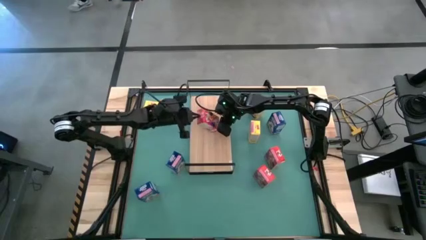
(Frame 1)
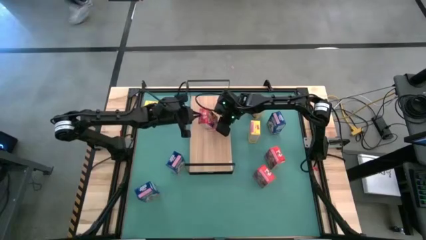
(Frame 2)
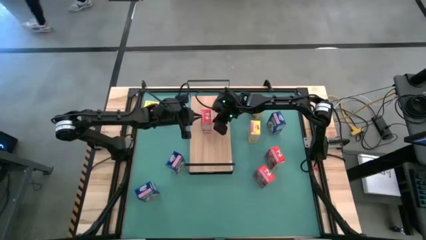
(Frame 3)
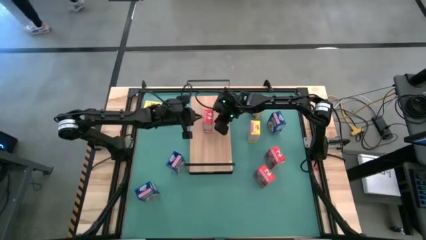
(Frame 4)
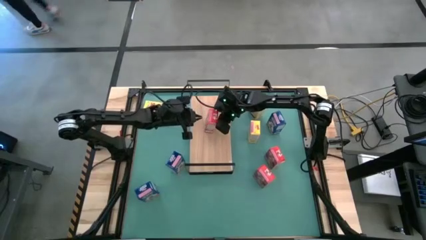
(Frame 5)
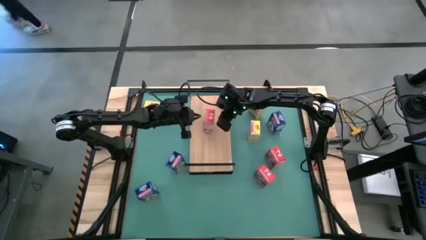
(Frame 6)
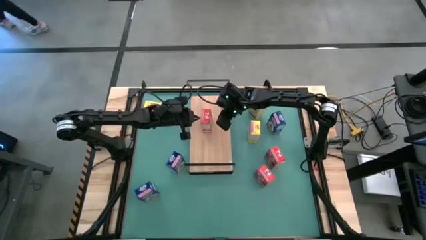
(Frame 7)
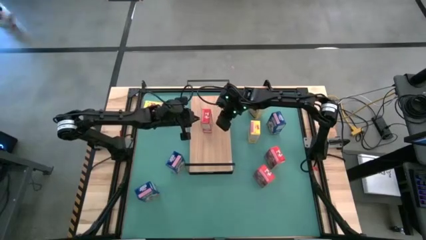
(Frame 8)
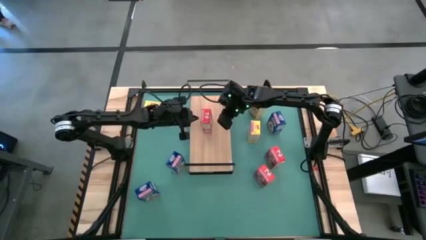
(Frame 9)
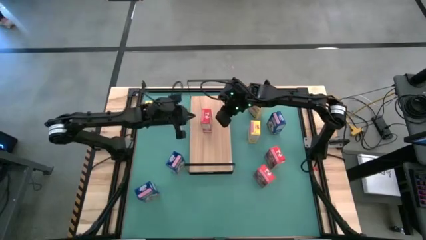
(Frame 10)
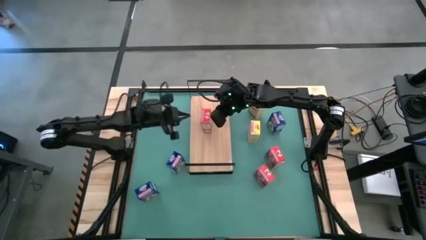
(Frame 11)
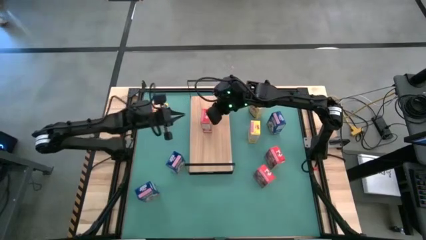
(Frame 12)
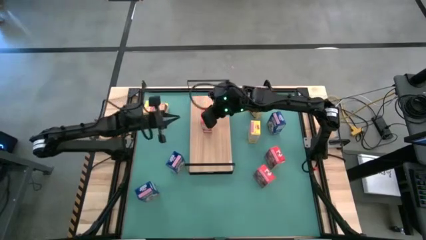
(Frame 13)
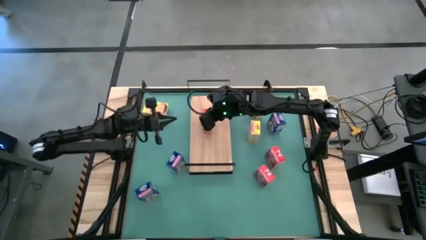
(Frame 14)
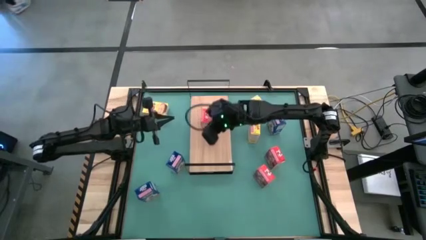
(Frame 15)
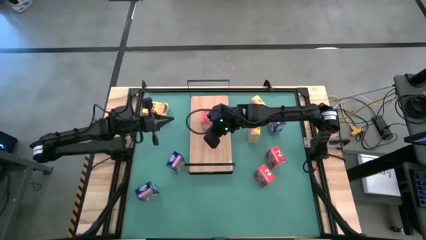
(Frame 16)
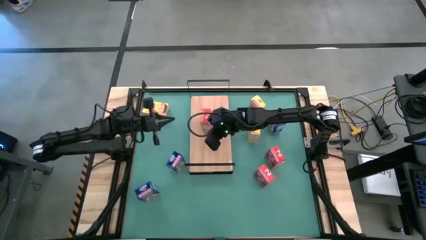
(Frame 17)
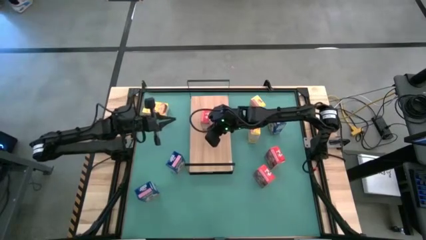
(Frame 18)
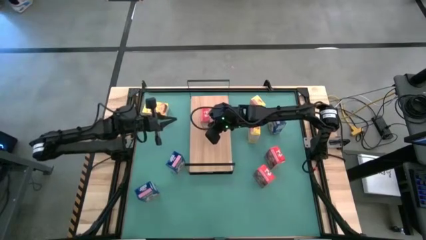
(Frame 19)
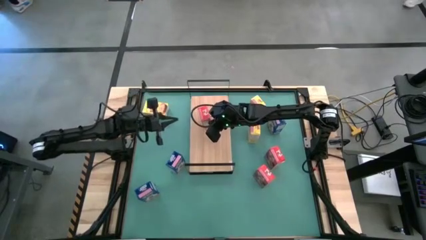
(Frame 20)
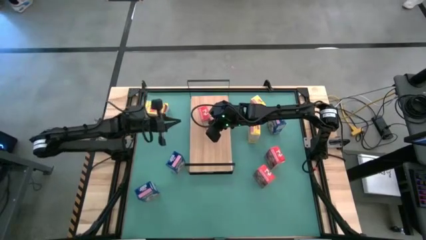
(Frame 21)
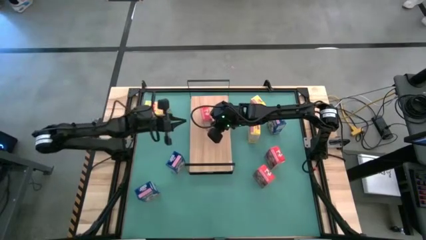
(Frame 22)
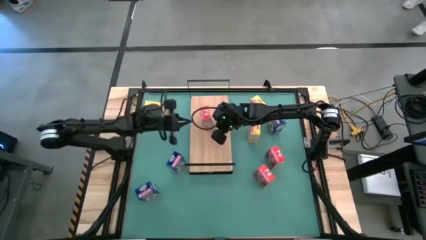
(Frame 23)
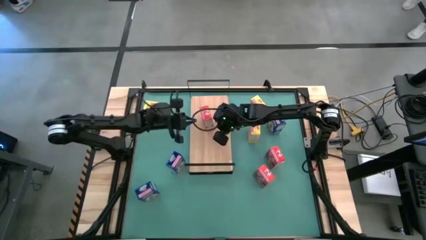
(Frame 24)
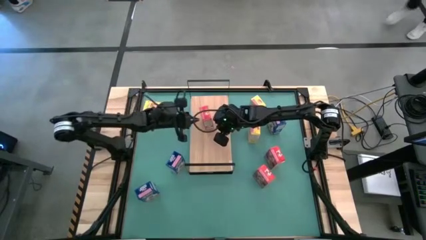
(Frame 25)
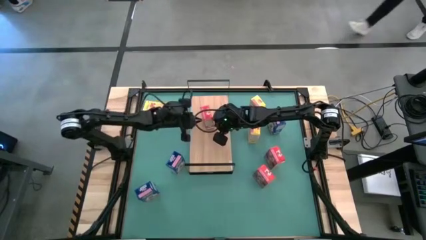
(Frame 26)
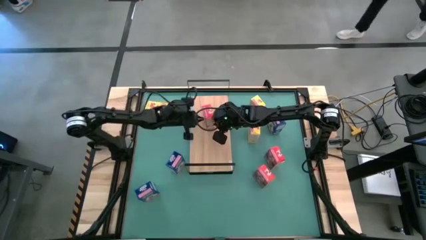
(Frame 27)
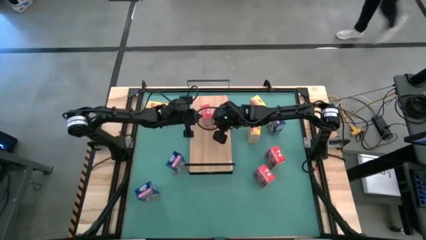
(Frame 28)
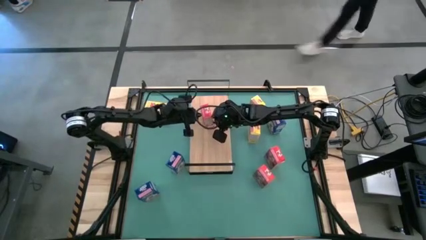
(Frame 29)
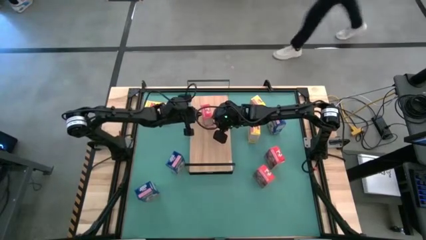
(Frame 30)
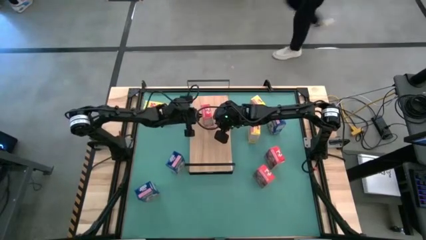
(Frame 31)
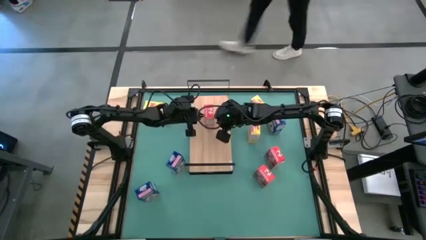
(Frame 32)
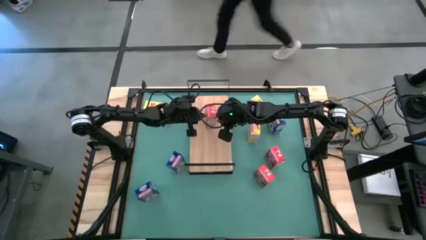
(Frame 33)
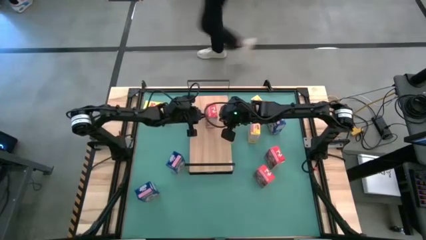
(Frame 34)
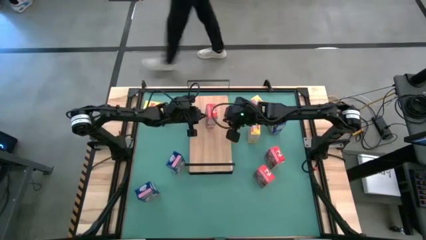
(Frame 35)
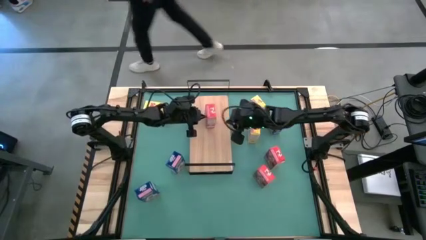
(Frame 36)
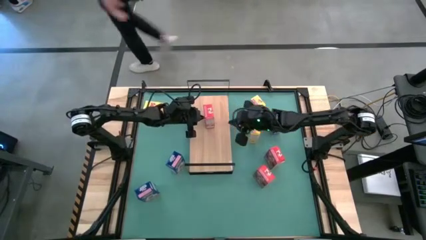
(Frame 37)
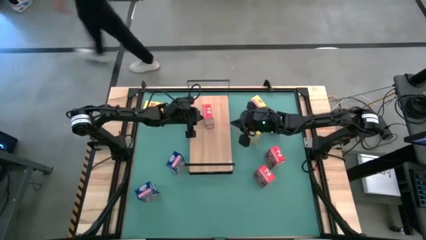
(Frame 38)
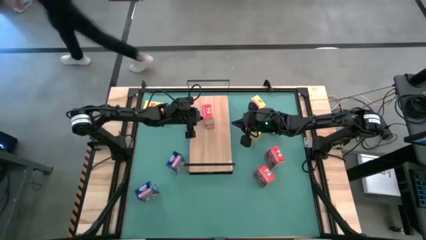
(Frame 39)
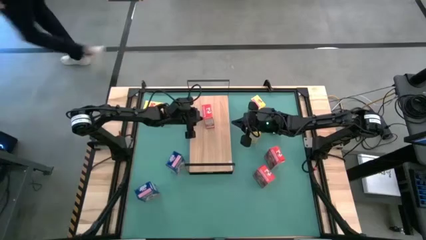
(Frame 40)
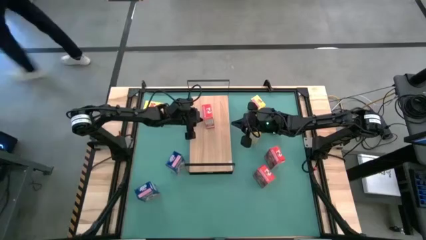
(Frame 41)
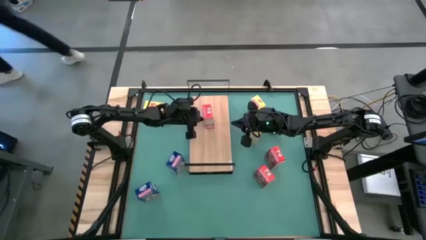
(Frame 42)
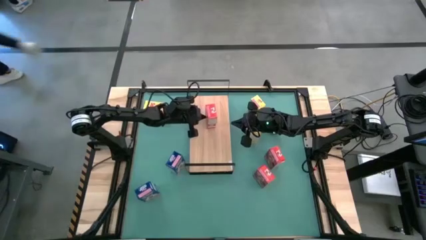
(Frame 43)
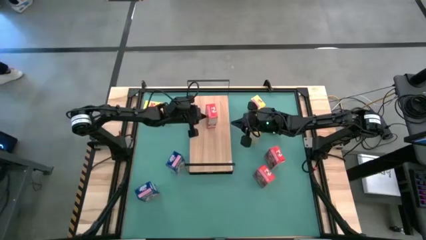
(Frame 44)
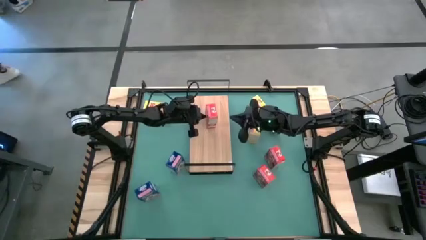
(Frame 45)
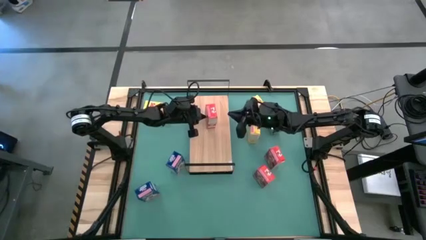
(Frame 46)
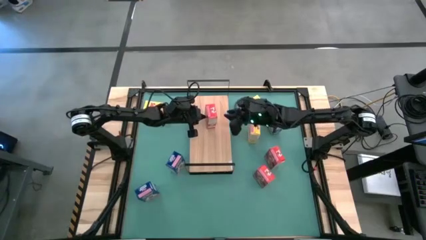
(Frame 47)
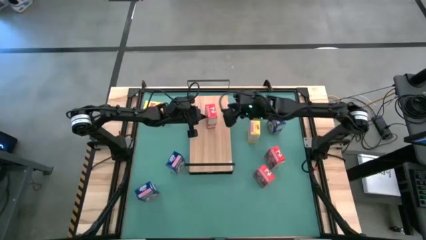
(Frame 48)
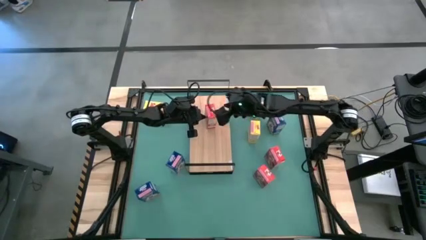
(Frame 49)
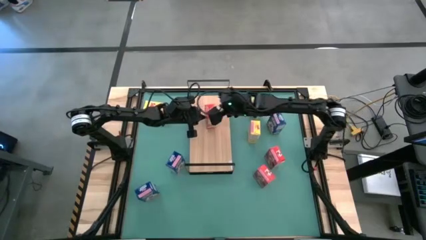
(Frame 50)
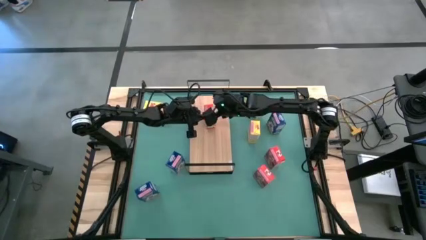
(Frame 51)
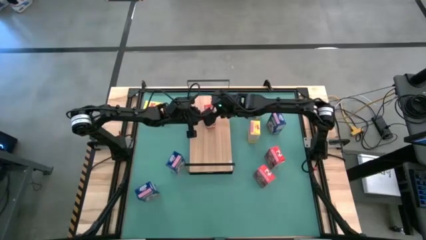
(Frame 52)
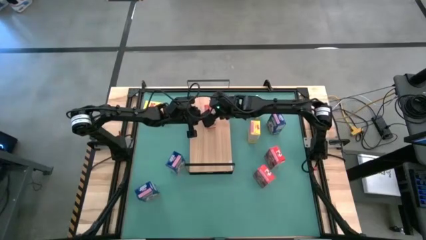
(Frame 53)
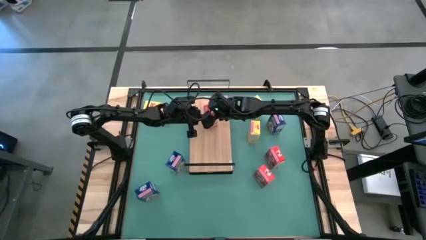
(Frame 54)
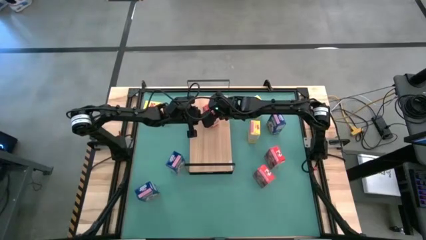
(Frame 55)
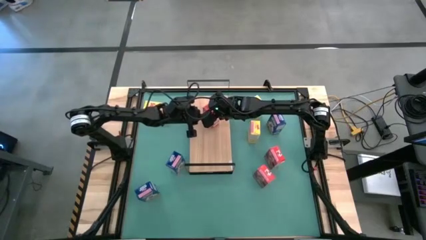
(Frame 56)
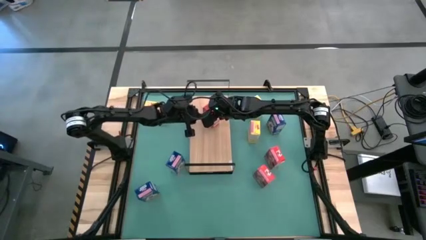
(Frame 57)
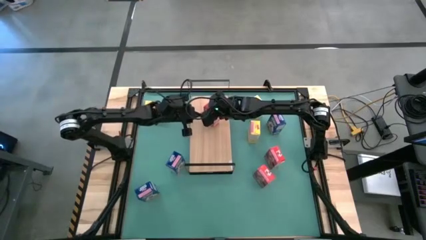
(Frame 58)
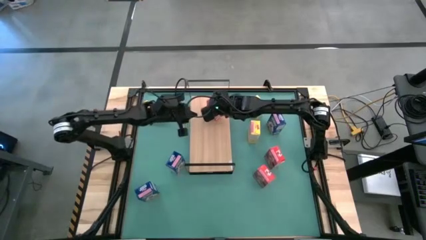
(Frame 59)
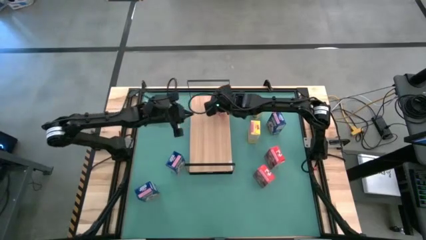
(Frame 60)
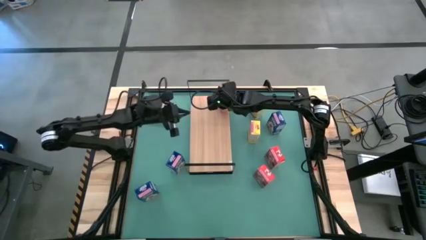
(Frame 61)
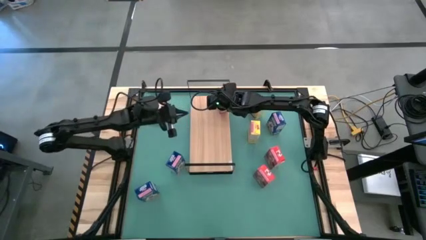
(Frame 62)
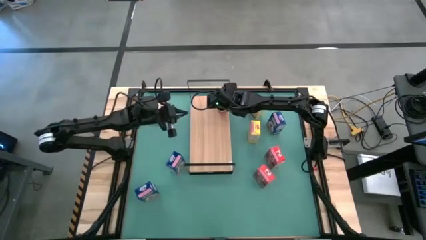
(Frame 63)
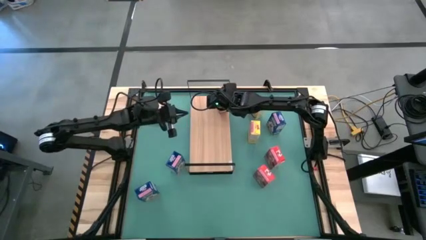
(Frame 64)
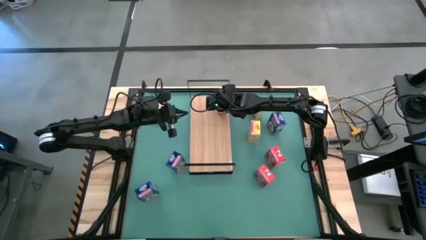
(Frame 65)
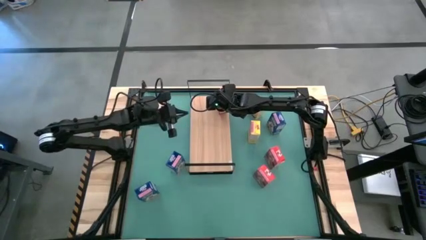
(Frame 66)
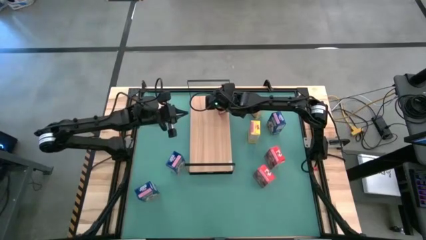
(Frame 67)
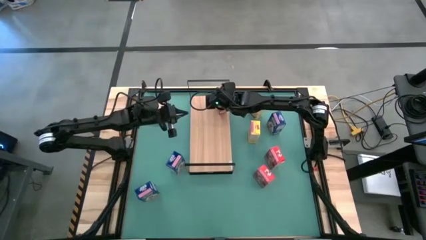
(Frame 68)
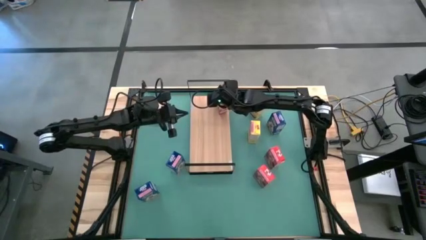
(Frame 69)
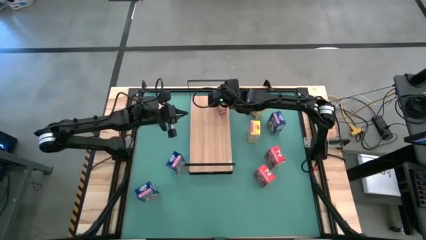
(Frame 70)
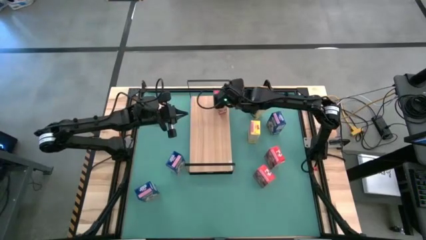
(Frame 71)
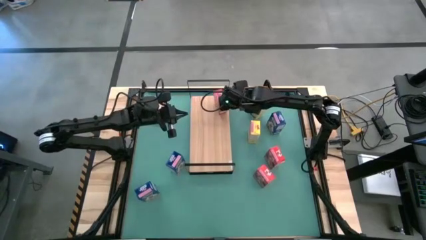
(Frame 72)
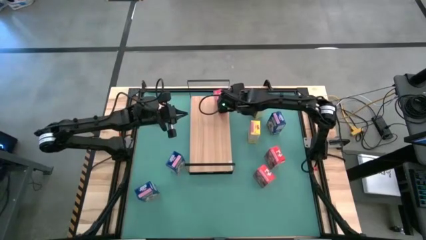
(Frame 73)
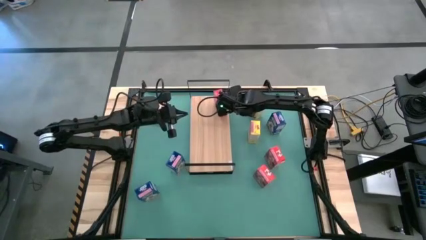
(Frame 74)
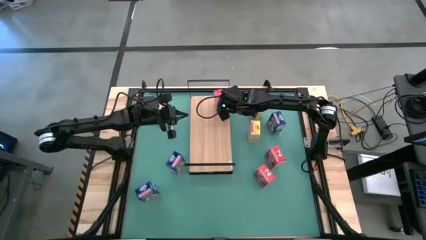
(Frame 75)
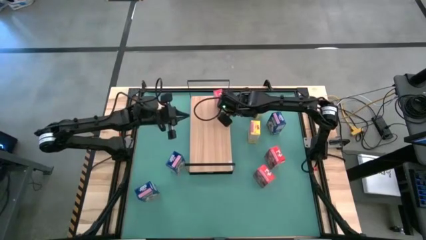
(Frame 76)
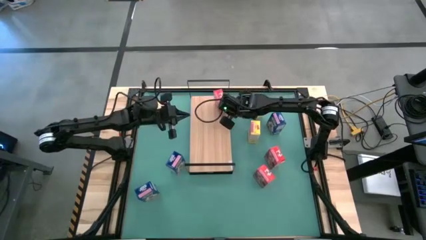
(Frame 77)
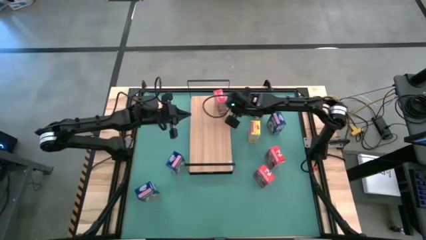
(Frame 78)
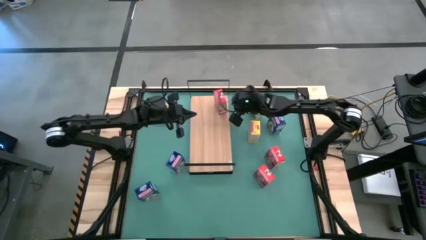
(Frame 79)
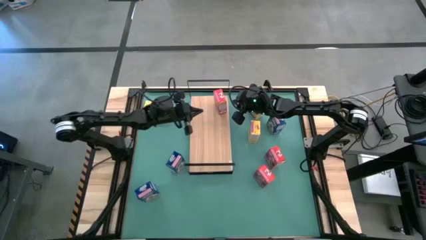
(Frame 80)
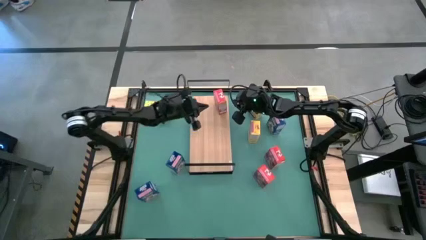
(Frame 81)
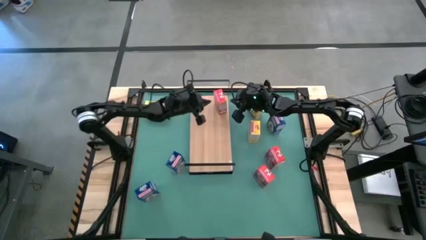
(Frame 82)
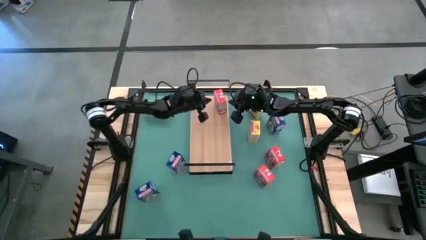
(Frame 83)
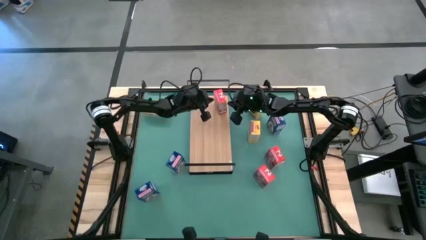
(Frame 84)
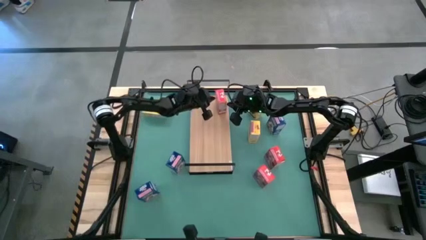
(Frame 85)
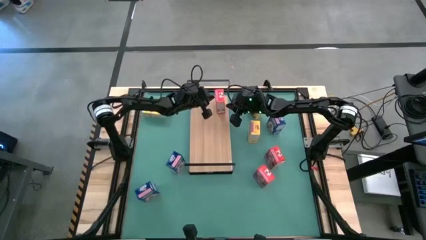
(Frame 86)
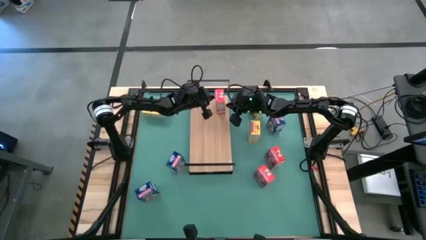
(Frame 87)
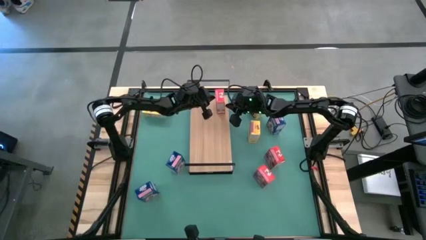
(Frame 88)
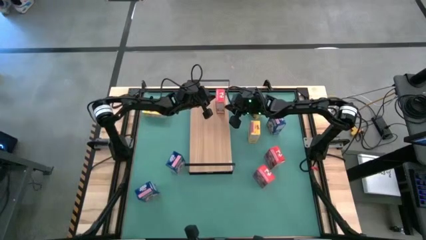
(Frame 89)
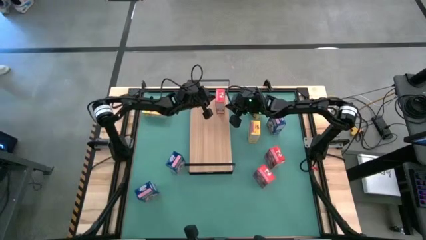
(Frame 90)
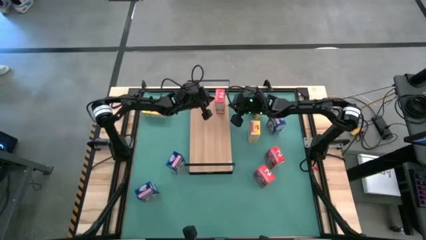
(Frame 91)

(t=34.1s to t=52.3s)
Task: Stack cereal on shelf
Put the top red cereal box on the shelf
